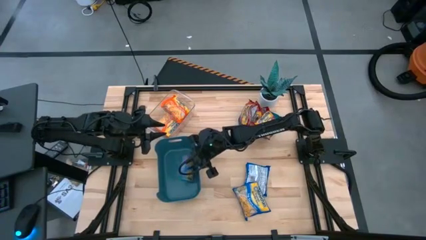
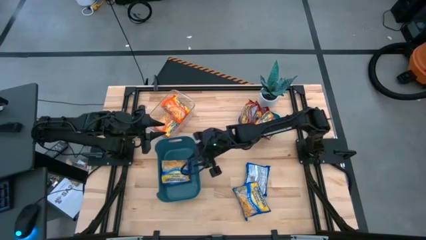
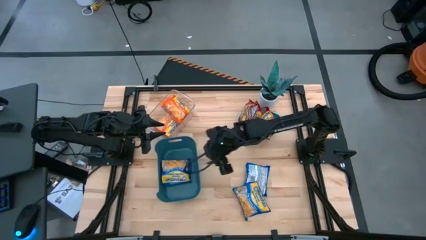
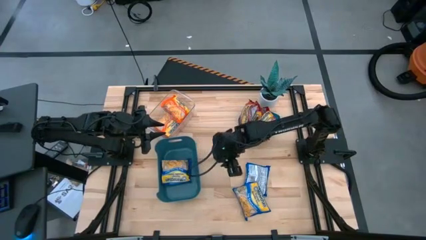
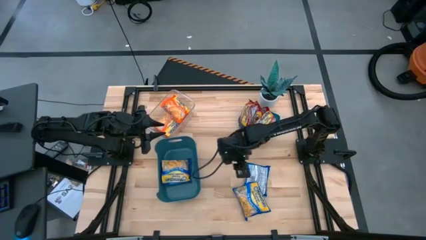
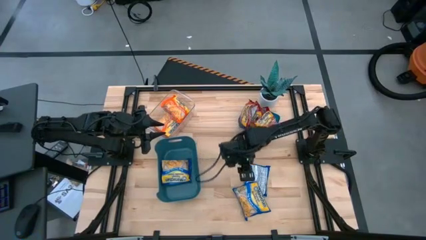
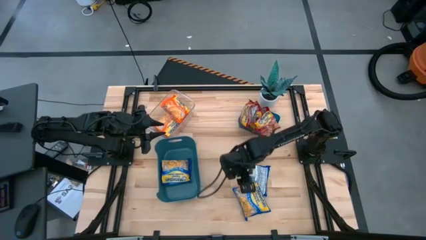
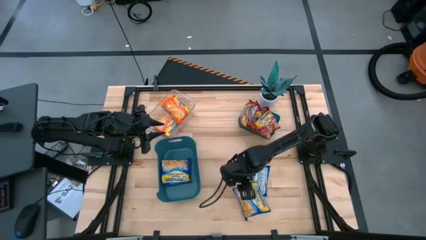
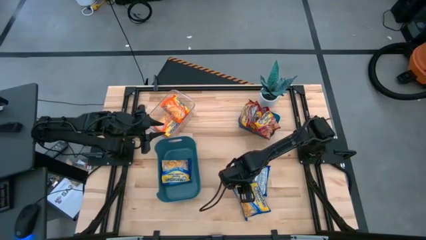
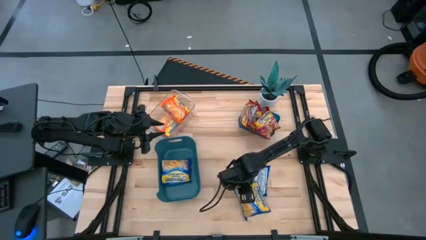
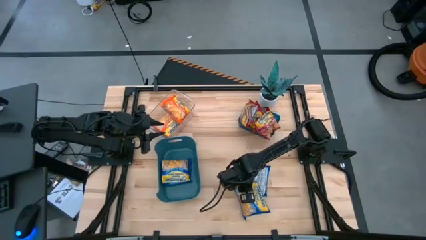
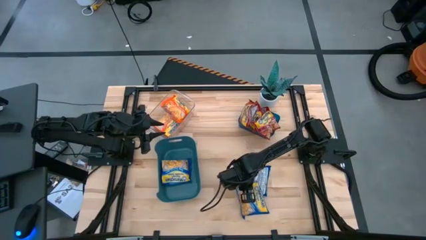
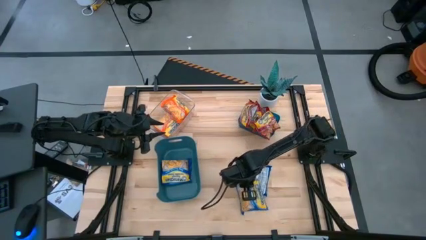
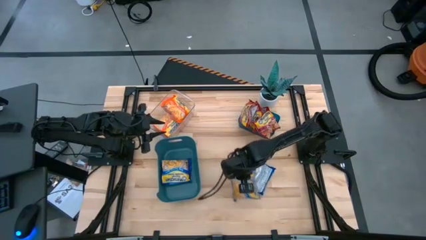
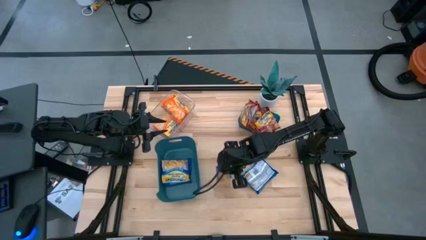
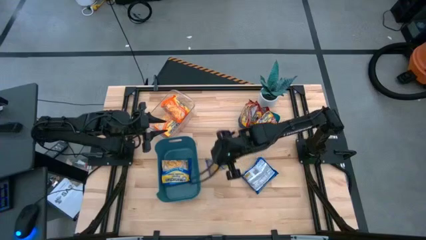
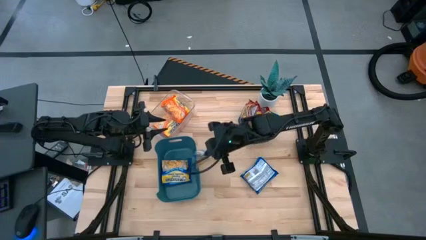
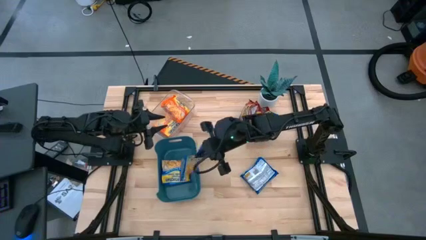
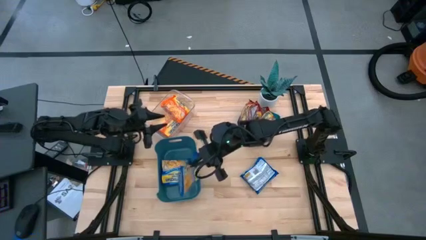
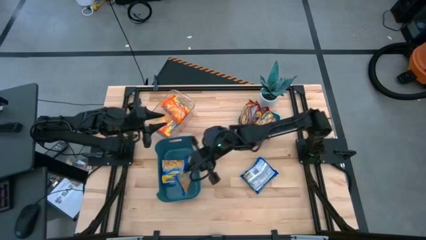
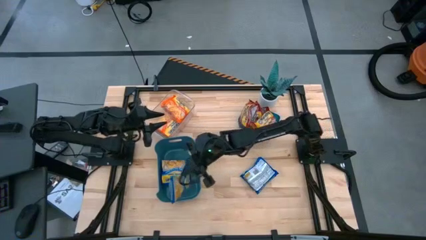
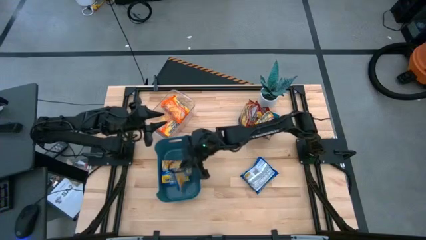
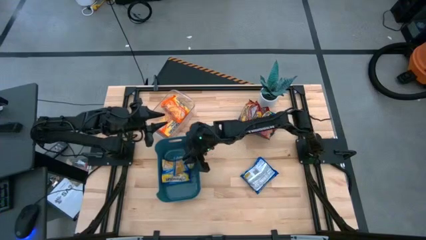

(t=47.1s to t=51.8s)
Task: Sort Maruchan noodles
Put the bottom blue noodle pack into the big blue bin

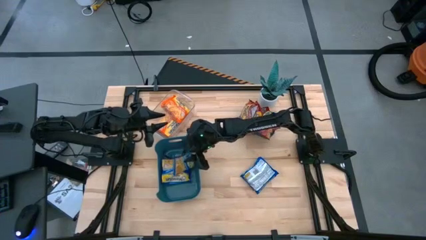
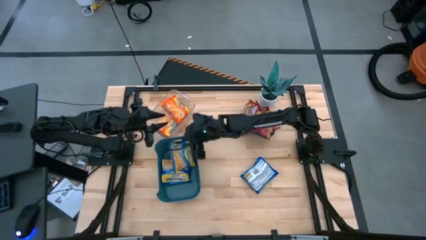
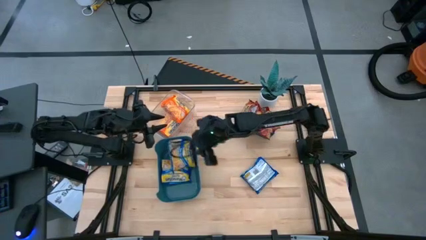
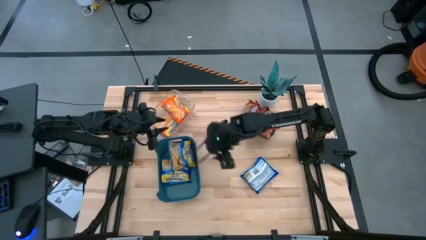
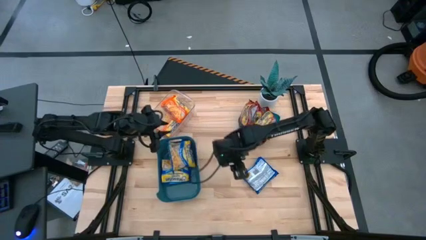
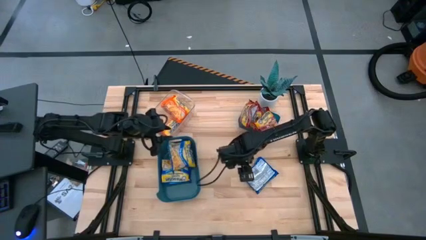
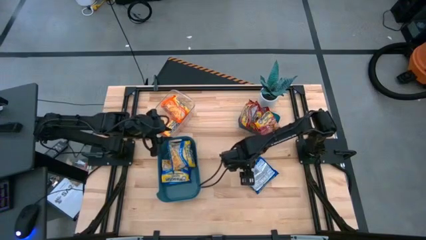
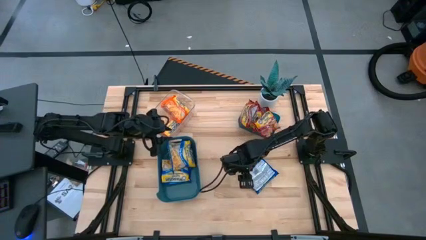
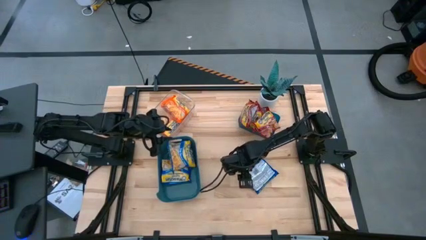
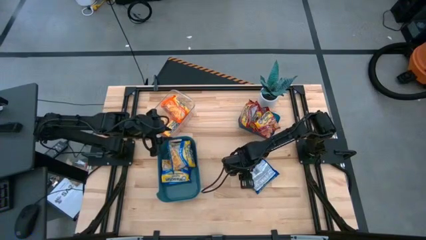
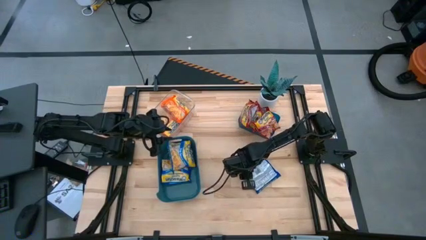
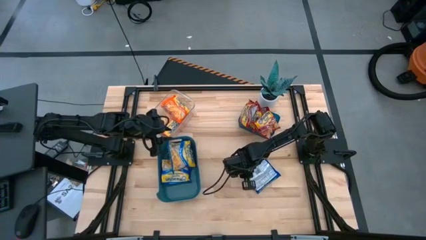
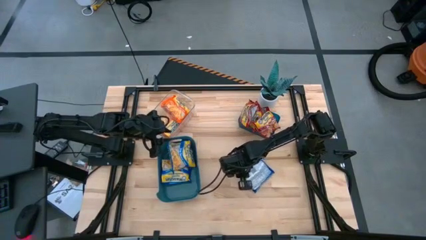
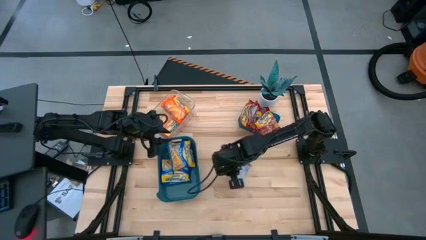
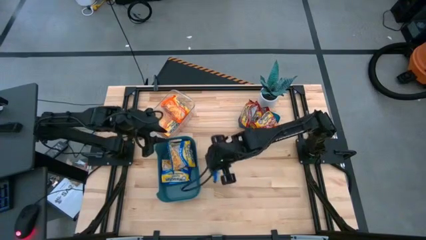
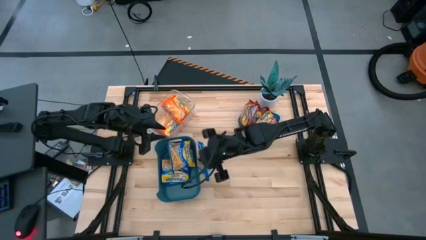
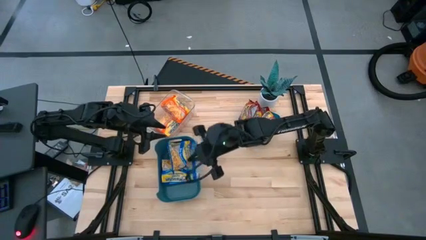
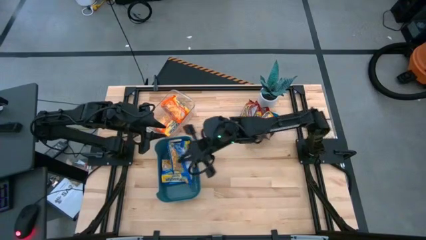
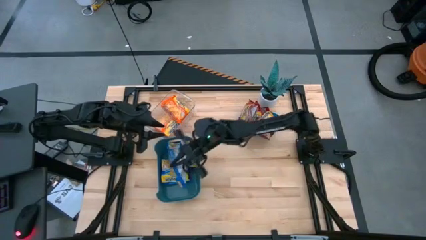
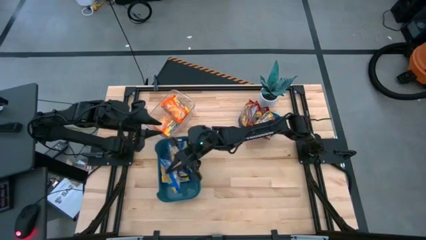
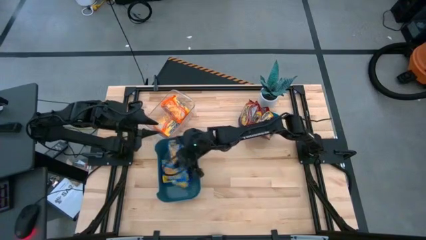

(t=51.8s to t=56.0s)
Put the blue noodle pack into the big blue bin

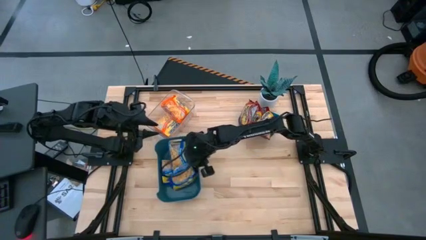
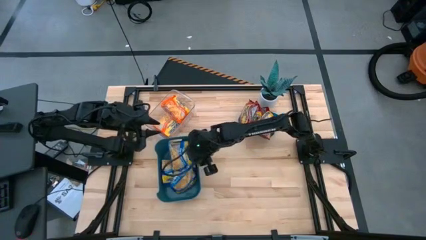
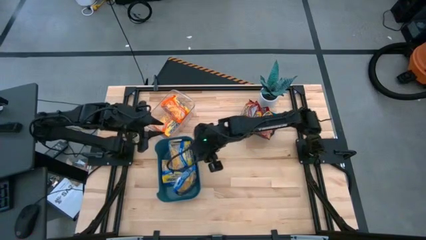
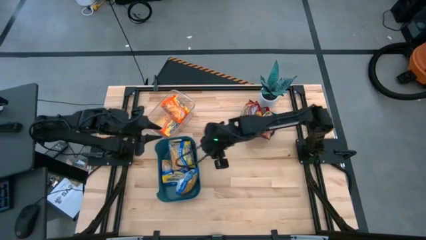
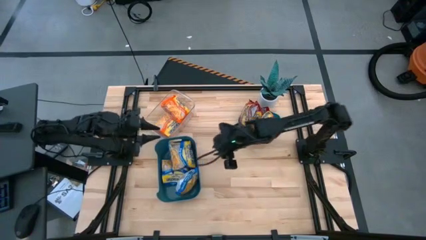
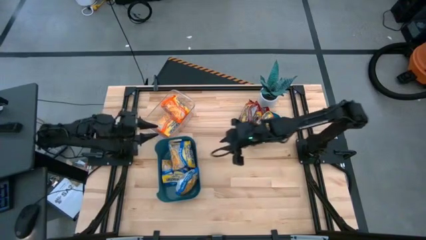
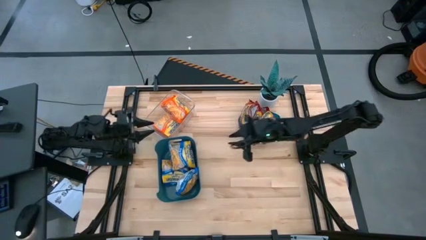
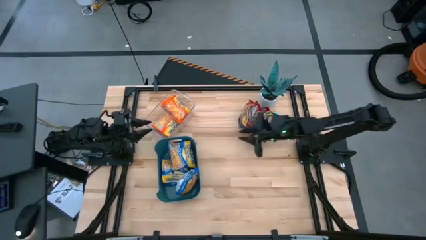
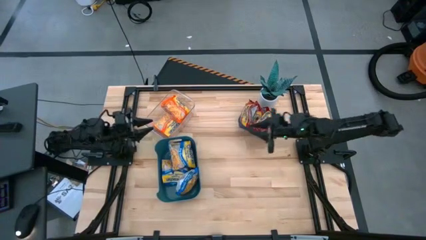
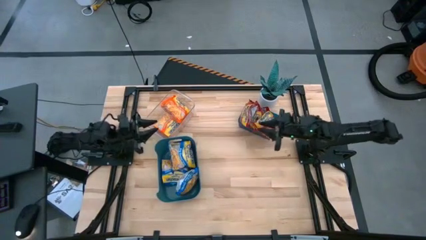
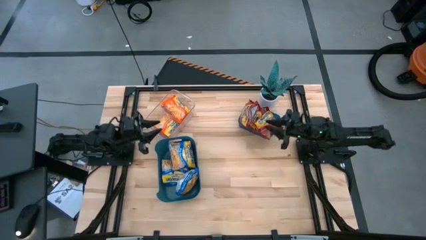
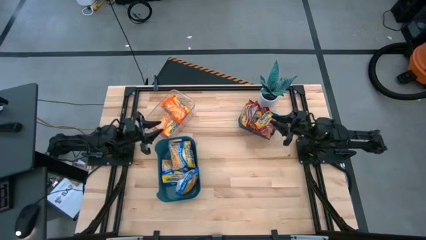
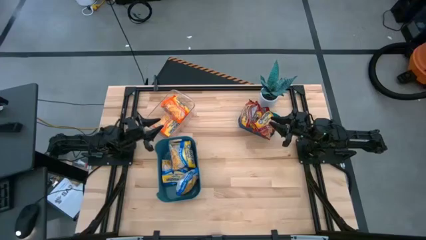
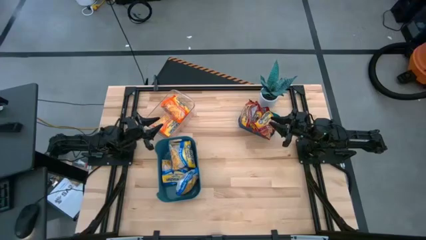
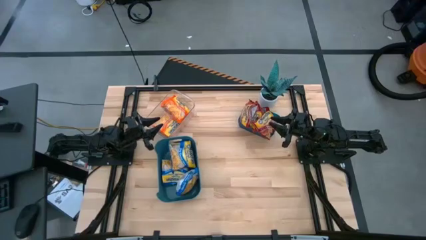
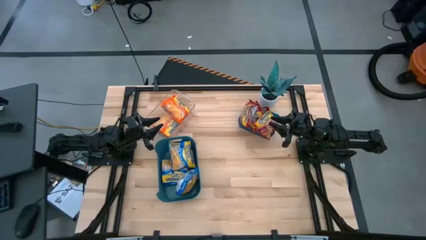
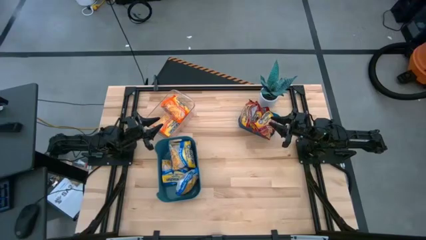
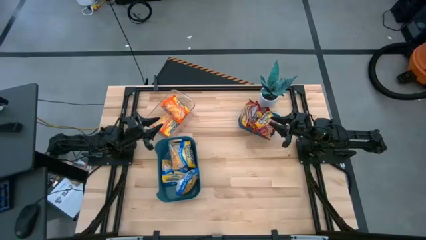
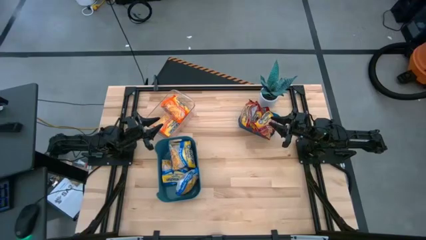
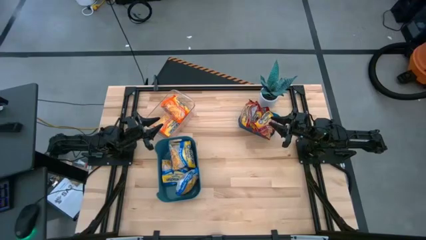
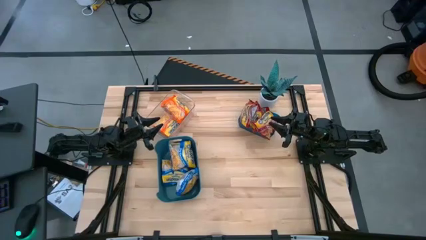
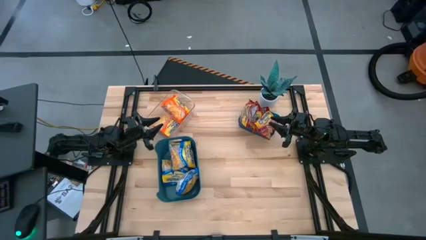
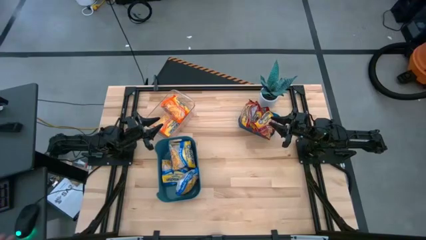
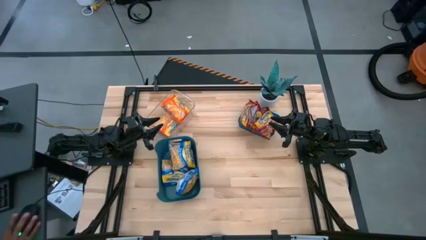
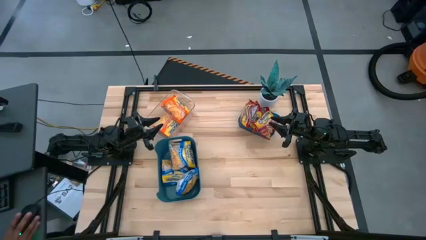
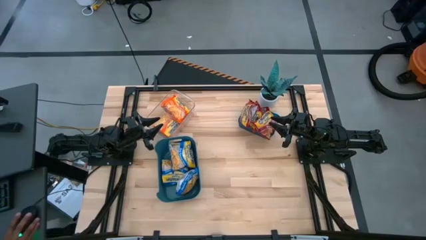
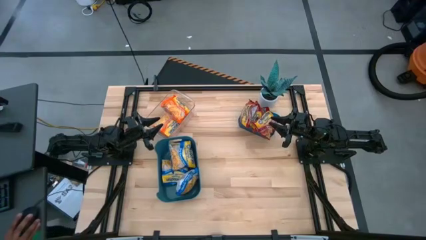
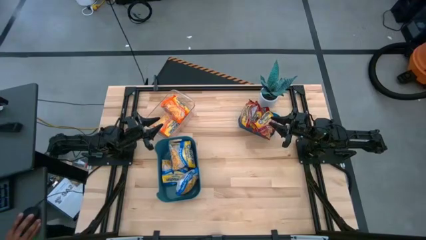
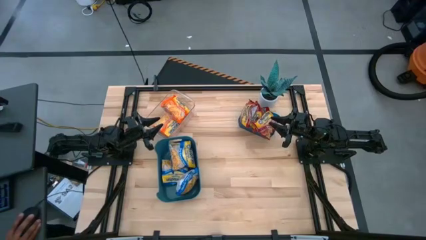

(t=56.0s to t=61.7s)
Return to Home Position

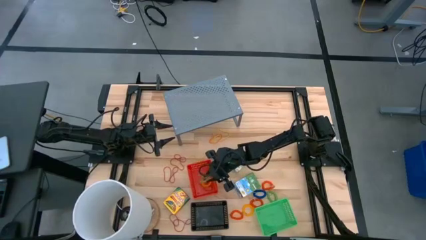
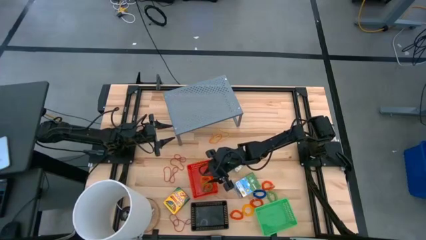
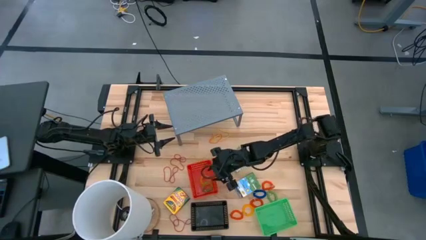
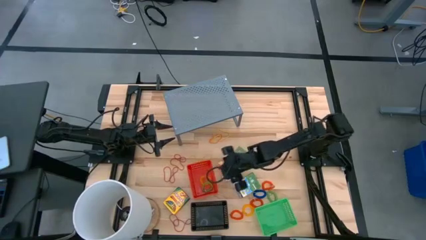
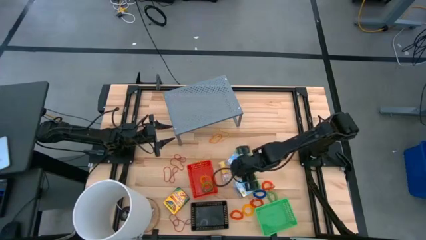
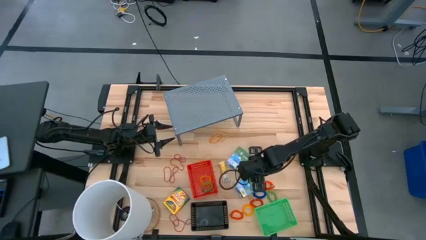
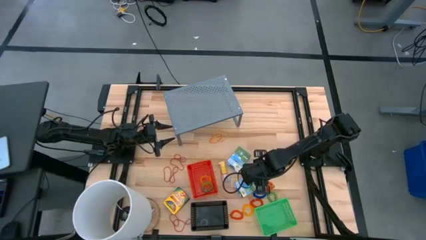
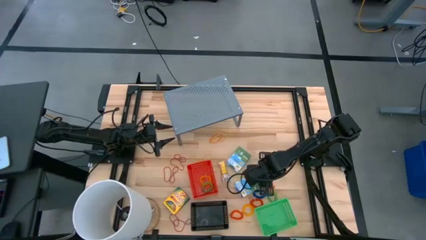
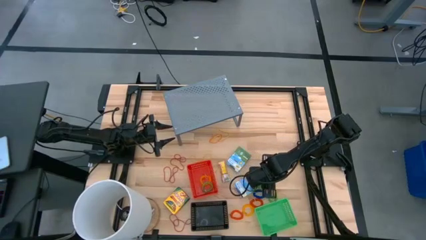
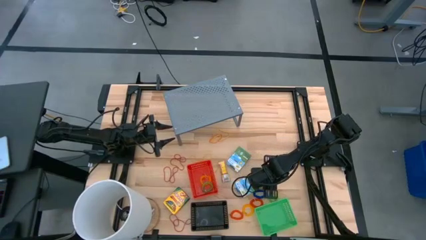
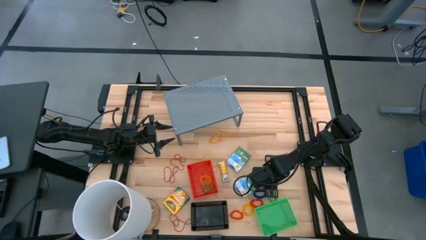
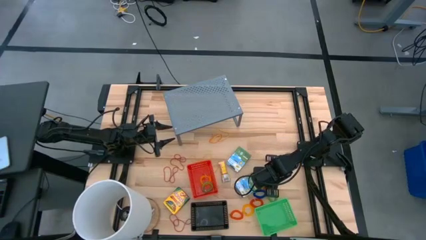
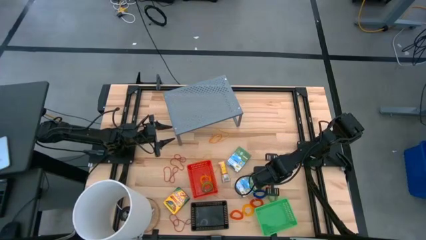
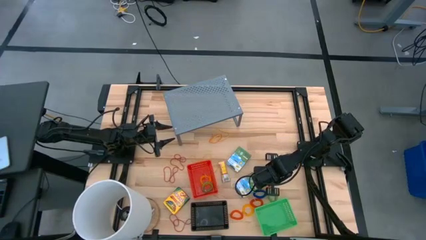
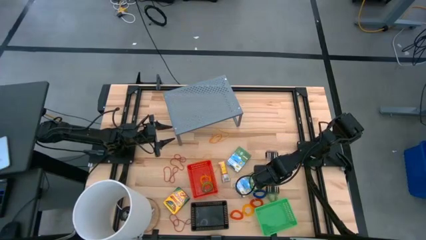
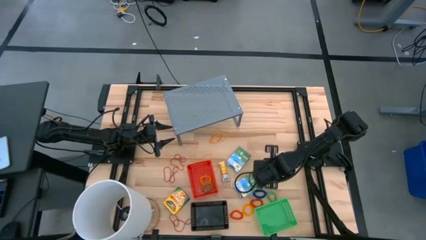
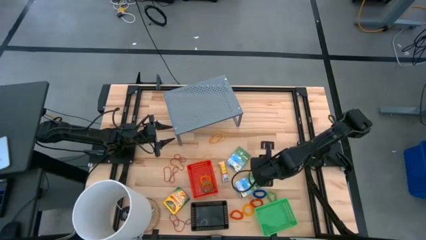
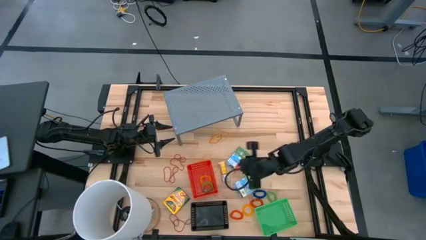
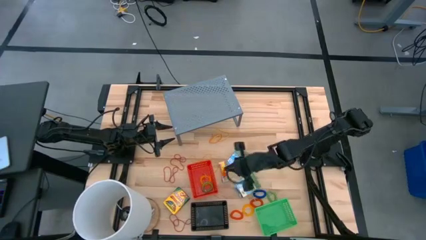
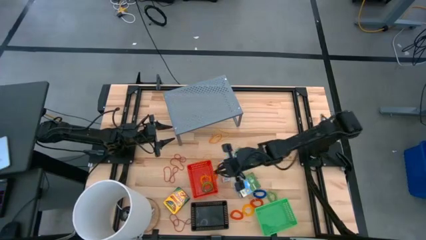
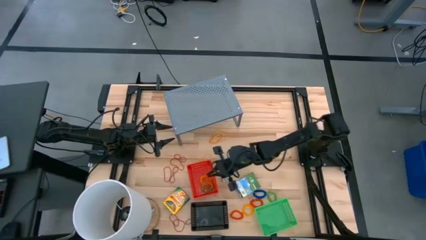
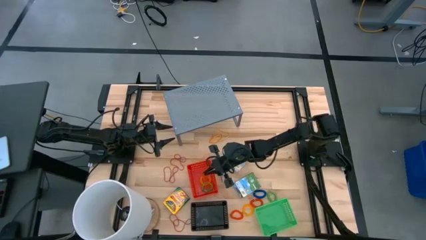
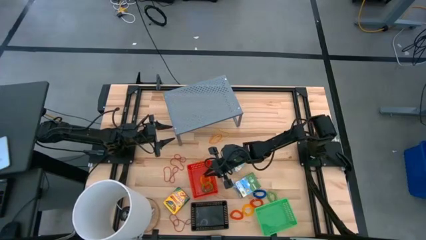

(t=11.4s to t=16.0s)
Task: Pick & Place Office Desk Supplies
Put the top orange spring keychain into the red bin
